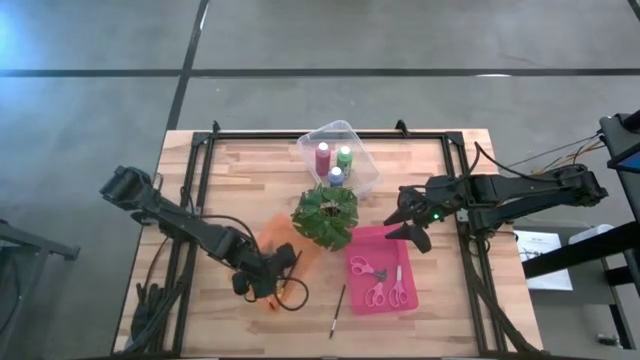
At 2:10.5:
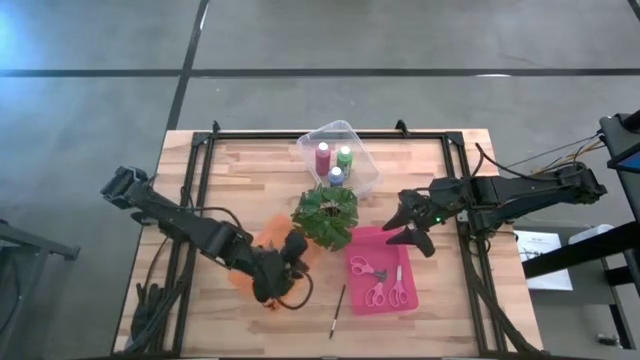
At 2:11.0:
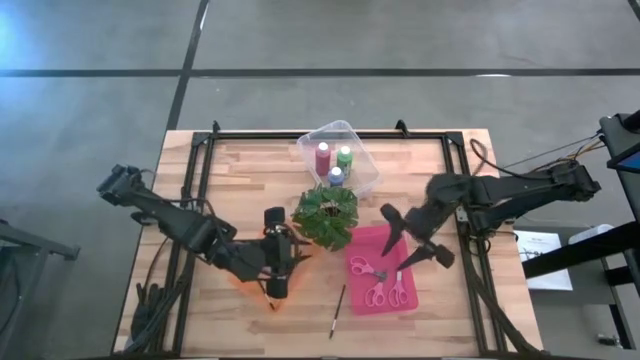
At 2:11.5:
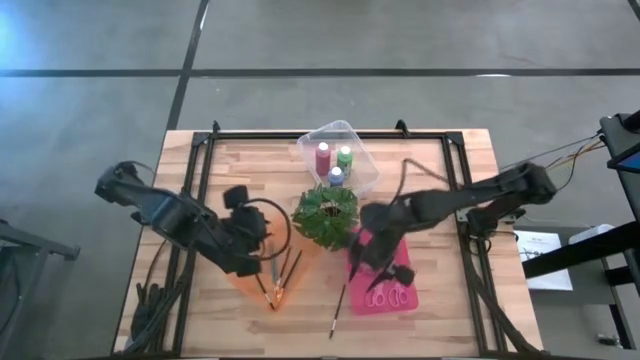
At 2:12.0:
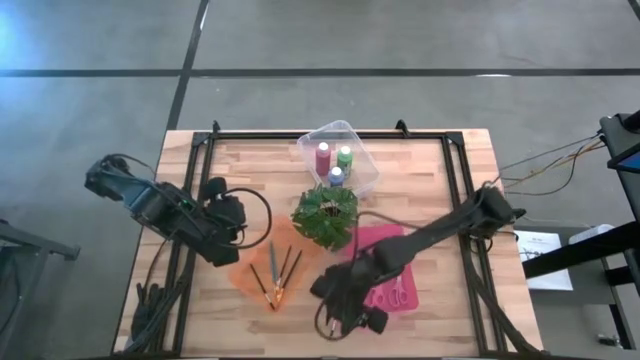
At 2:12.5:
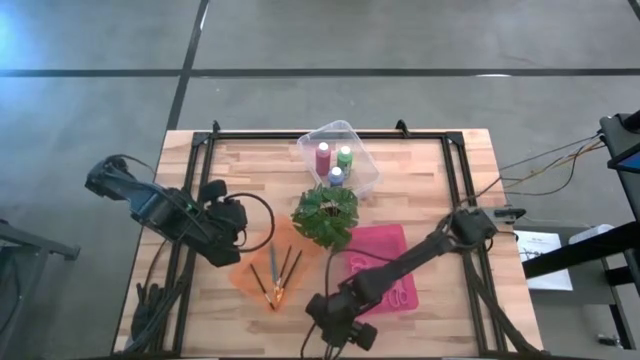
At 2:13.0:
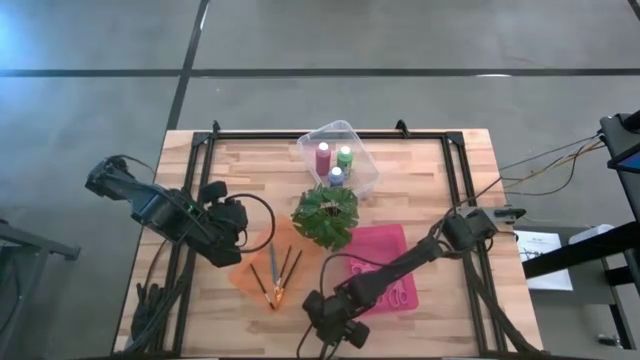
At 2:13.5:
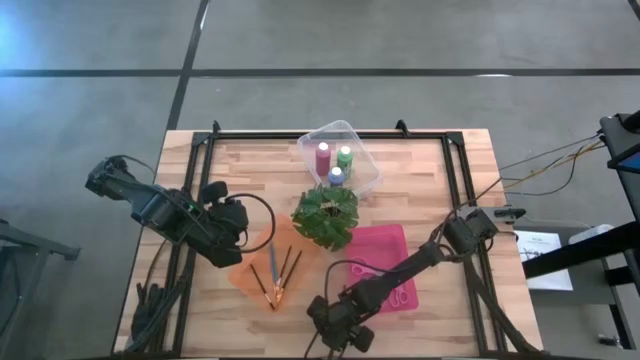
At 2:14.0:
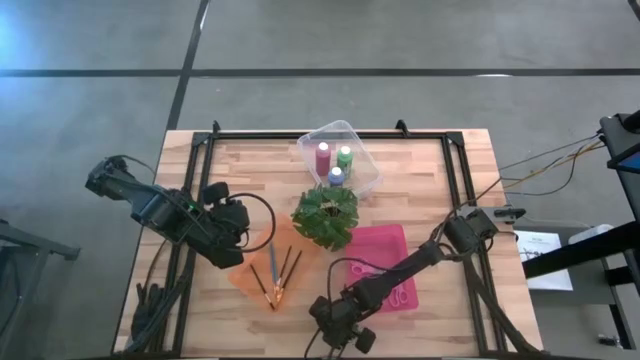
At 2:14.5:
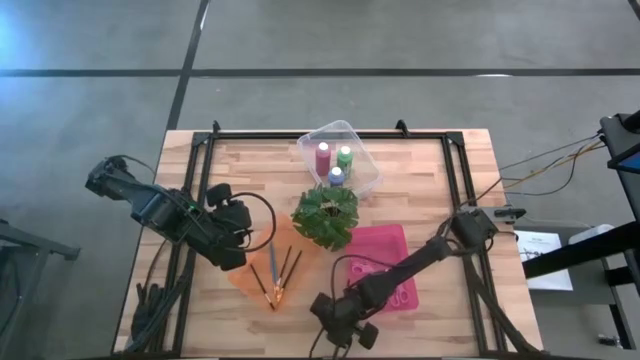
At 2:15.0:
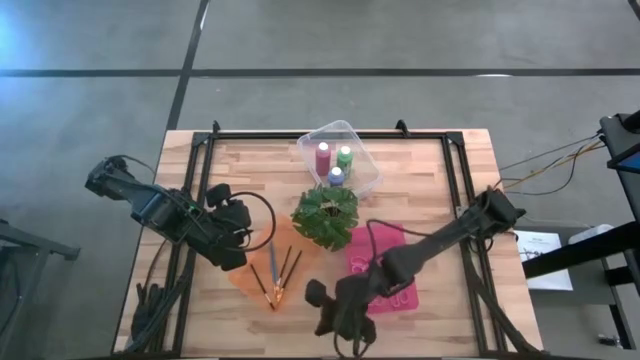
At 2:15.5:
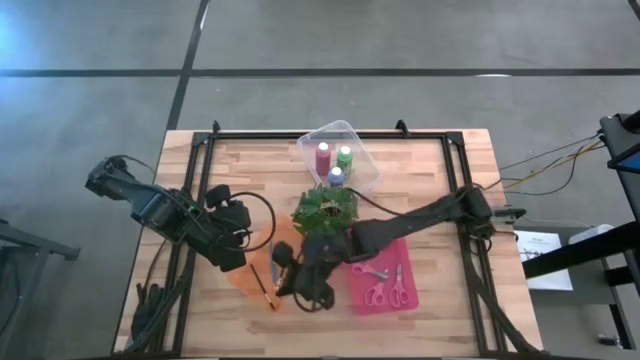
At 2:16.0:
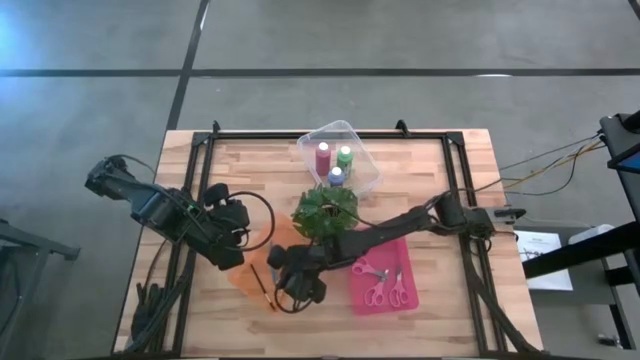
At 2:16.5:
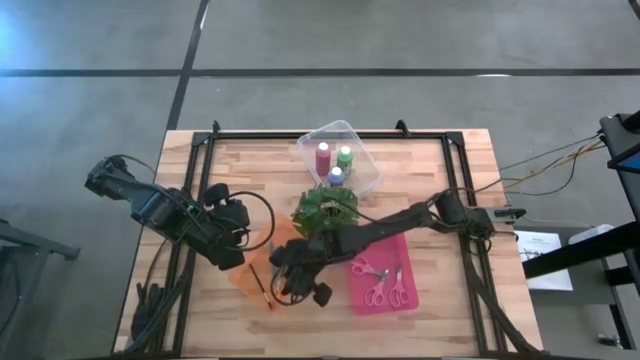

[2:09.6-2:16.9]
Task: Pick & Place Paint Supplies
Put the black brow brush into the orange bin

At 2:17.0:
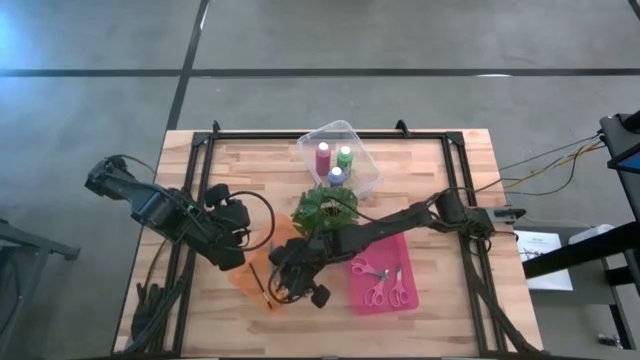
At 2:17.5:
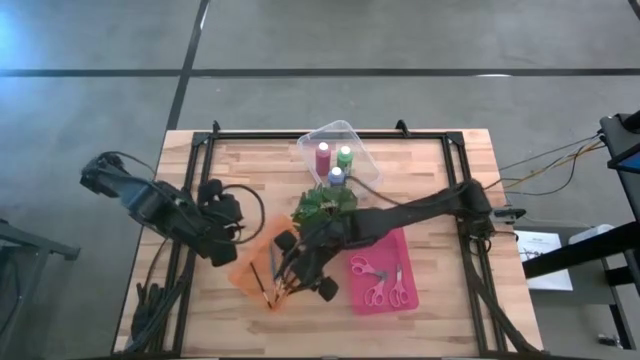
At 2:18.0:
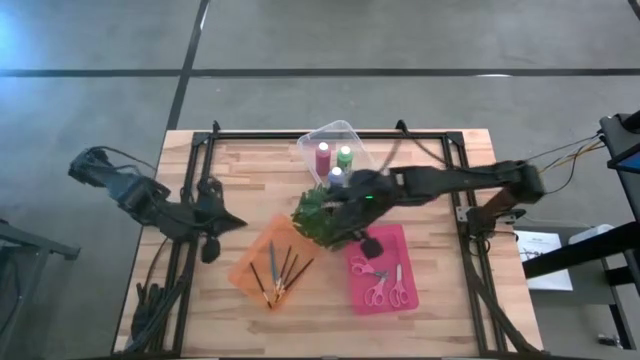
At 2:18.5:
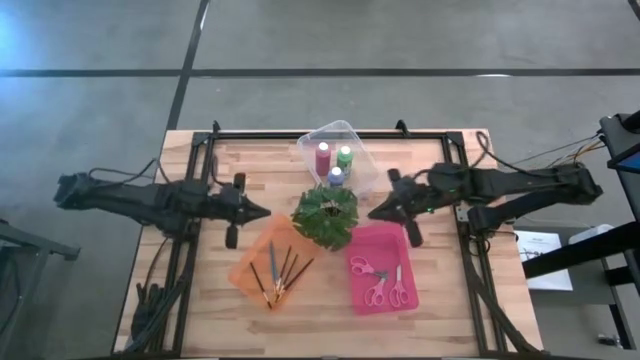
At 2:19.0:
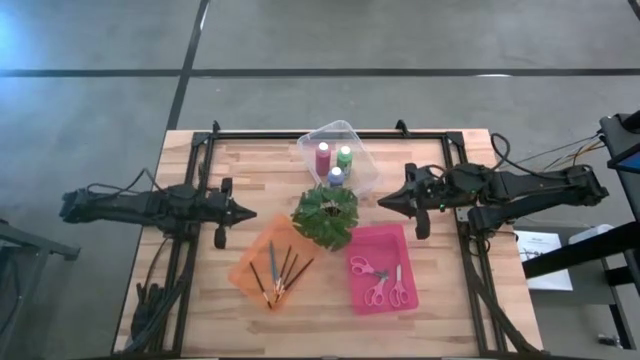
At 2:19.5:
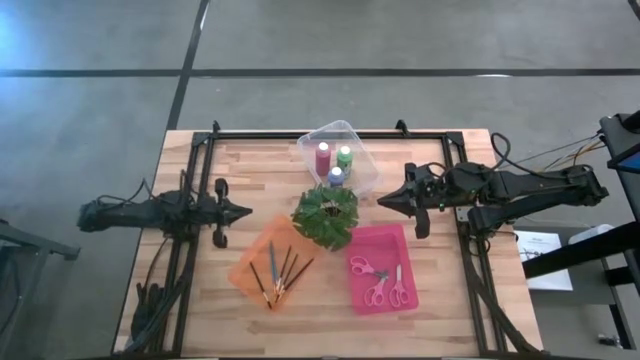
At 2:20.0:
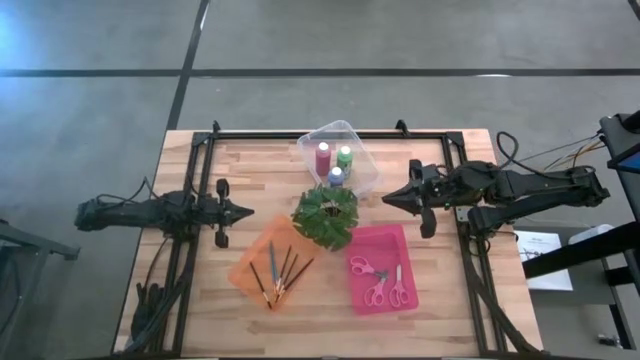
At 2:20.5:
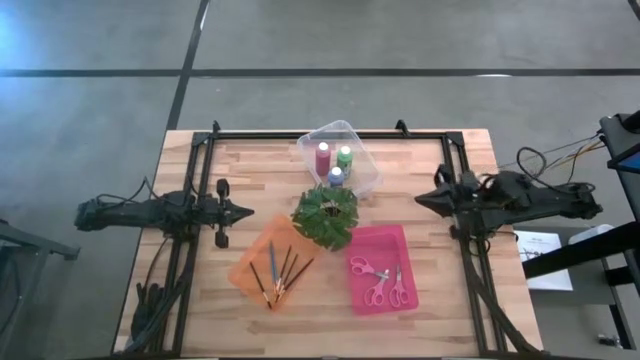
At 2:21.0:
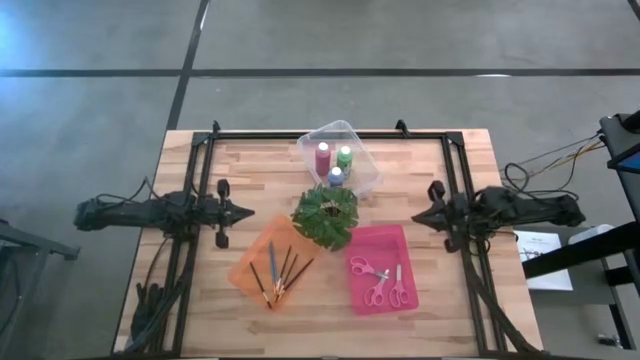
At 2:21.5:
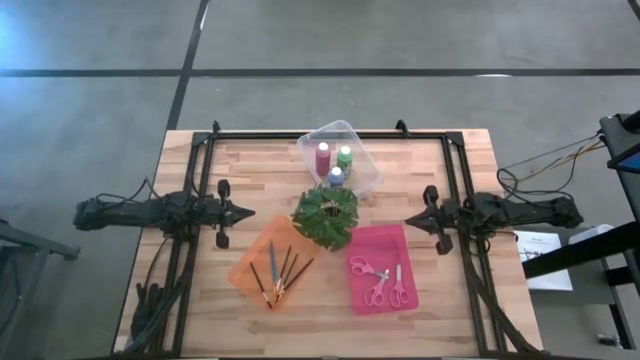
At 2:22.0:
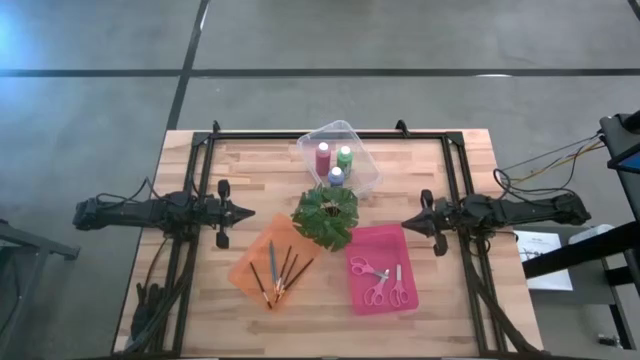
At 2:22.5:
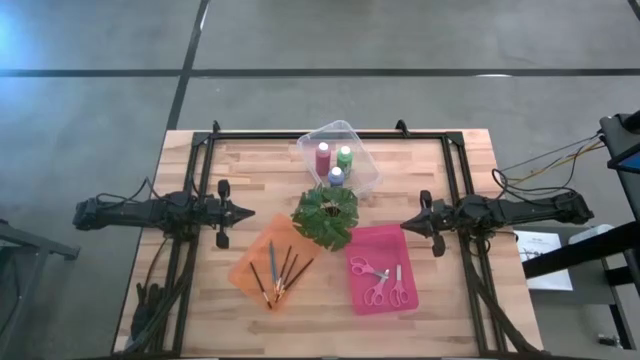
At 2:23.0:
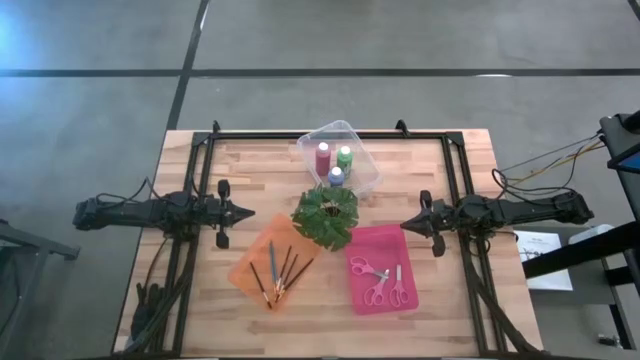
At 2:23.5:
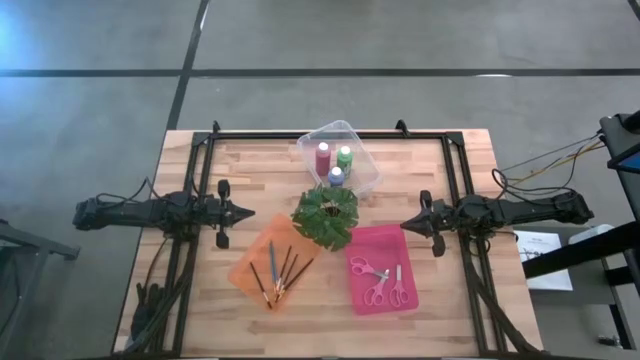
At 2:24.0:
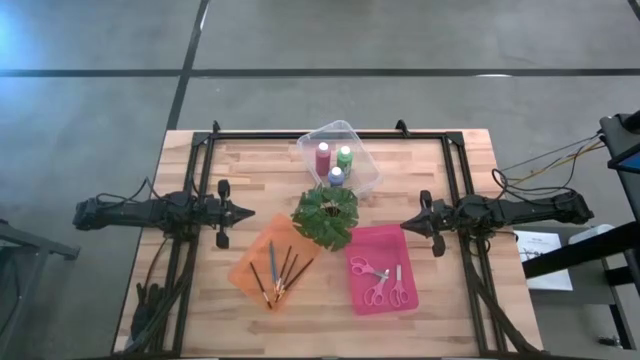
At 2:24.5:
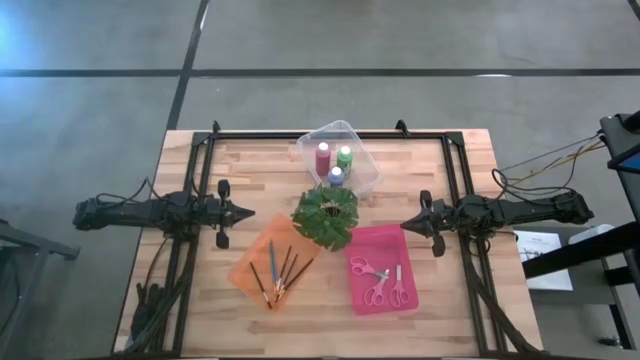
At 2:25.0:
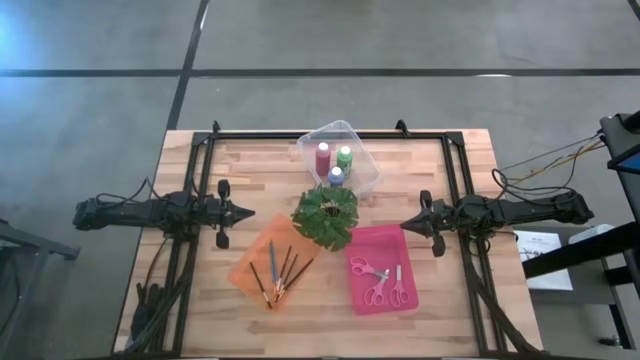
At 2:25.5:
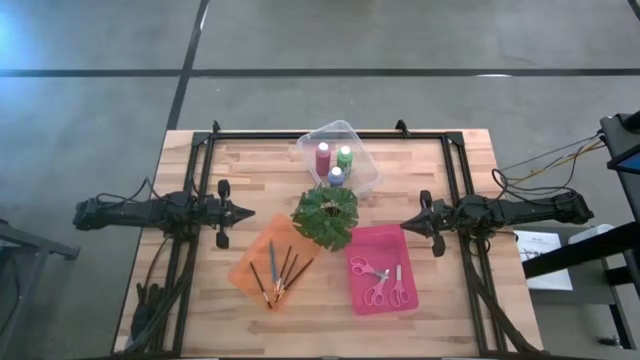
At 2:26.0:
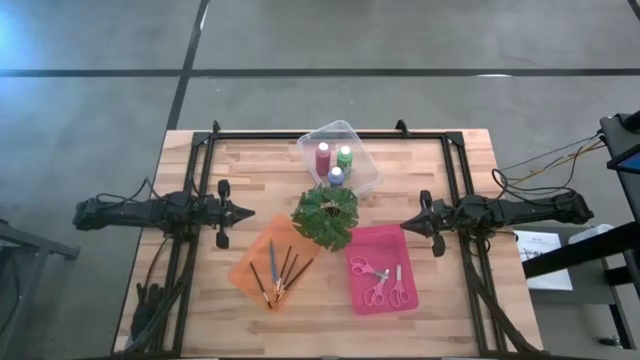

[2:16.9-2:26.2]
Return to Home Position

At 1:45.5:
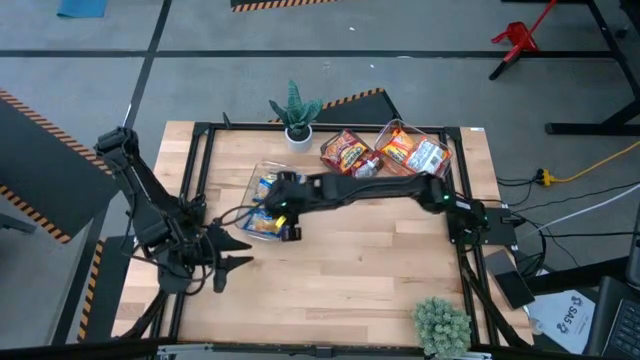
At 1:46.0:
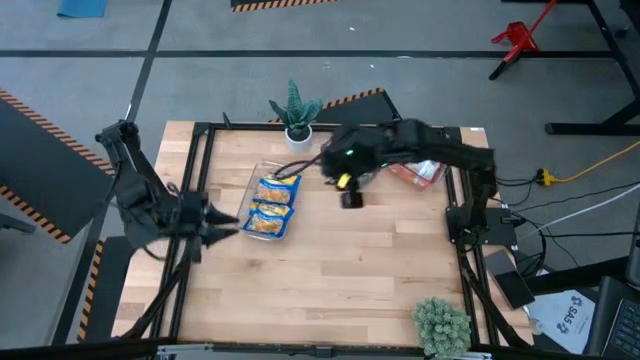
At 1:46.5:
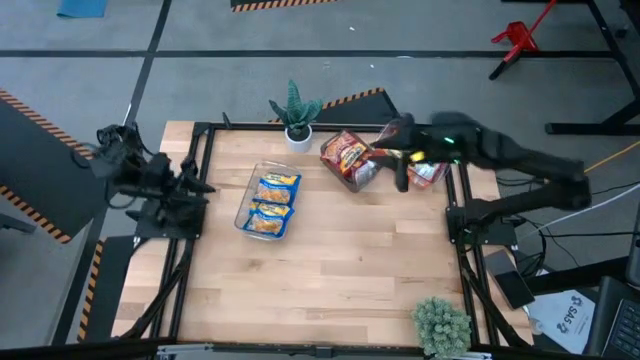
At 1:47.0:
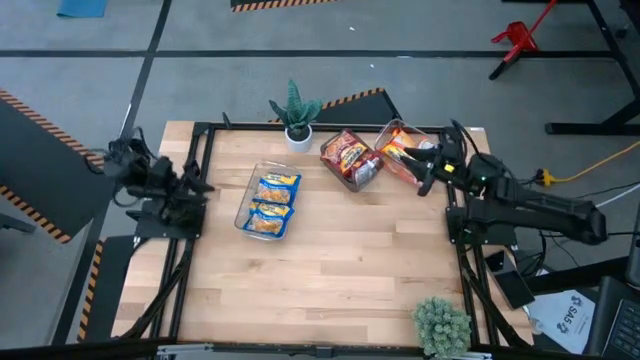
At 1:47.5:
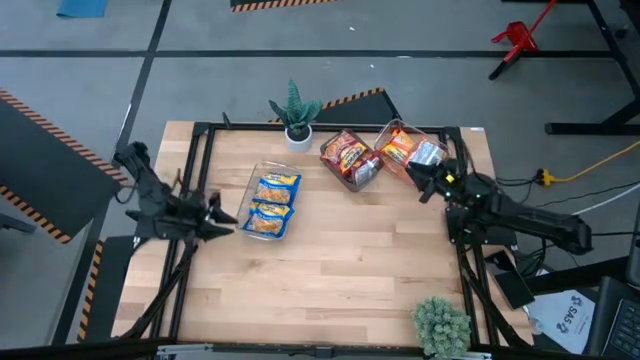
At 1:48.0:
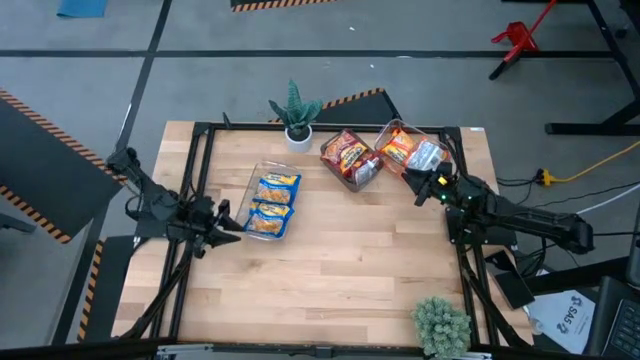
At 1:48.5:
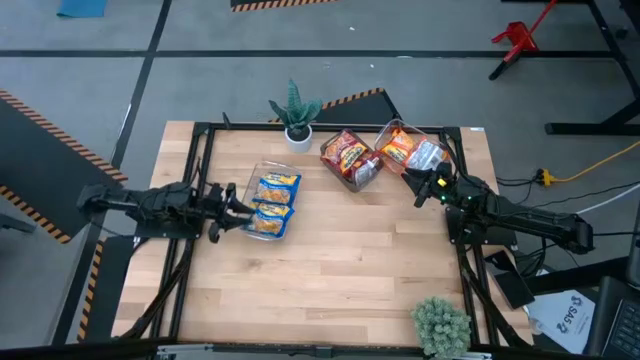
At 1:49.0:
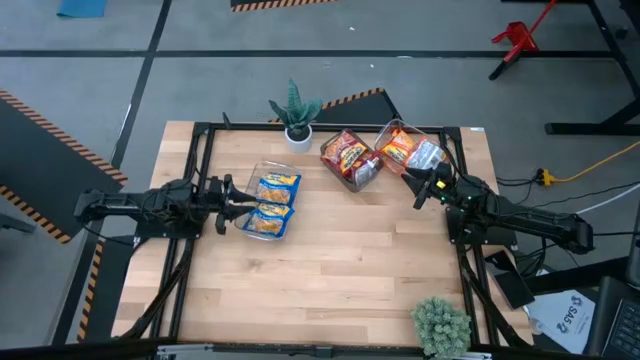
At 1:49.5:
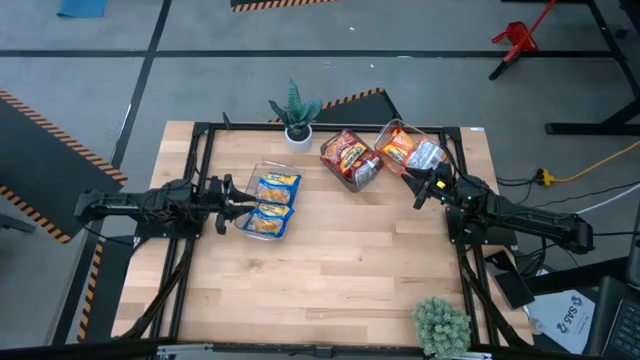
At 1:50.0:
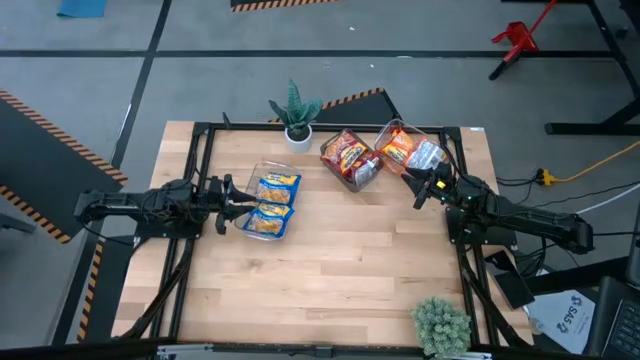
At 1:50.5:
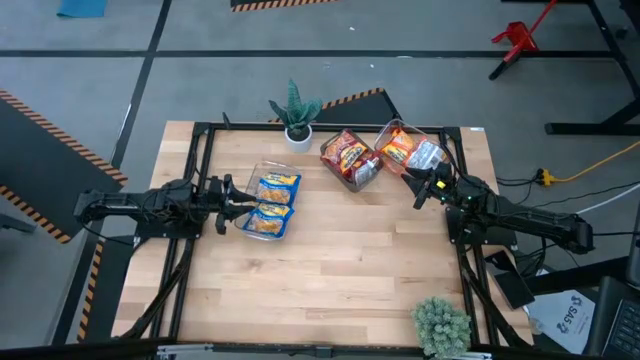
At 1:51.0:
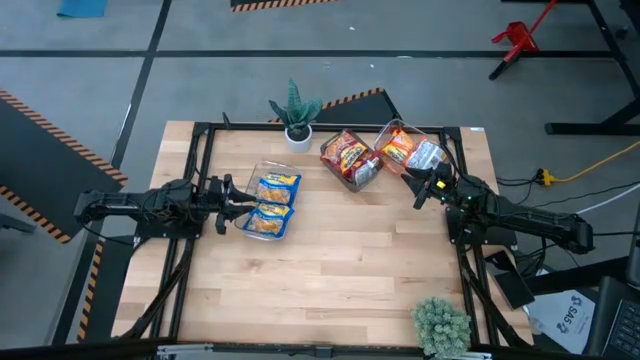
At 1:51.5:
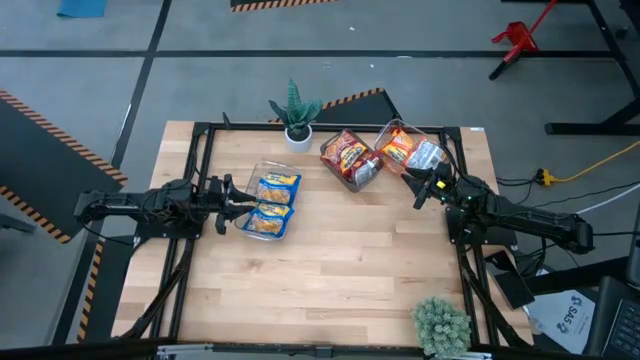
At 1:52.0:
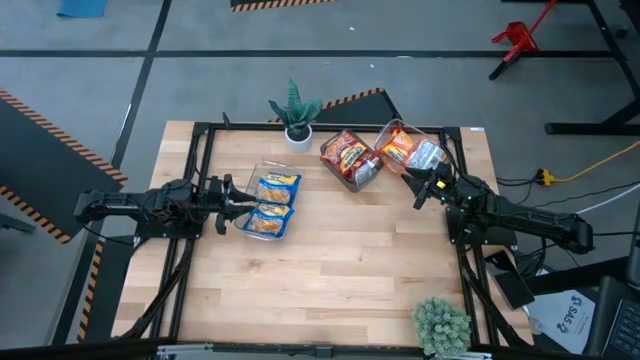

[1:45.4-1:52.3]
Task: Sort Maruchan noodles
Return to Home Position
